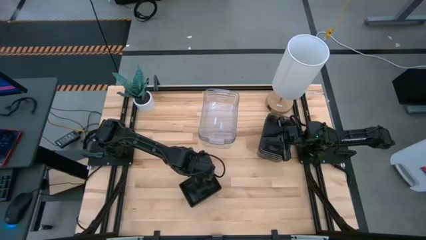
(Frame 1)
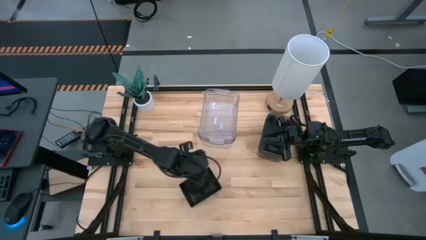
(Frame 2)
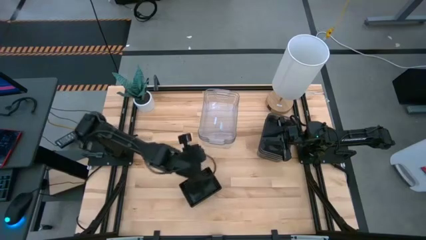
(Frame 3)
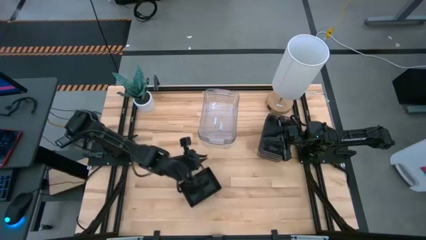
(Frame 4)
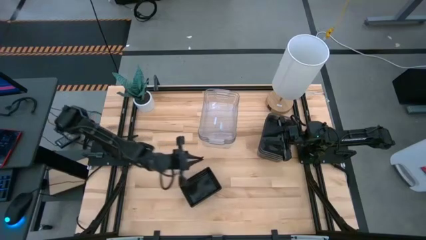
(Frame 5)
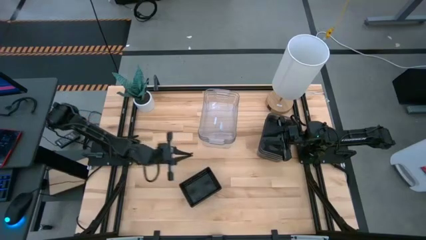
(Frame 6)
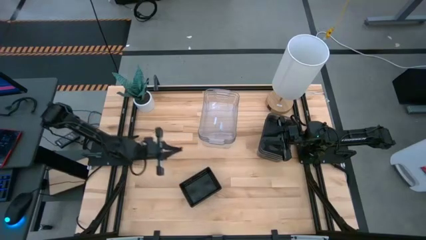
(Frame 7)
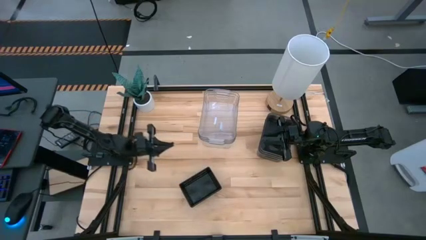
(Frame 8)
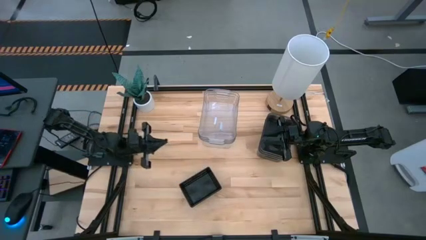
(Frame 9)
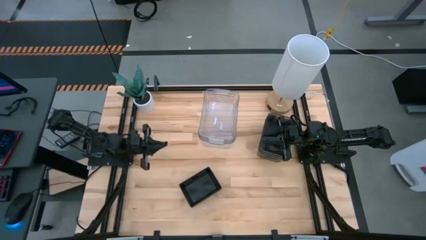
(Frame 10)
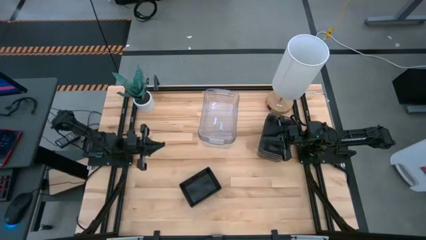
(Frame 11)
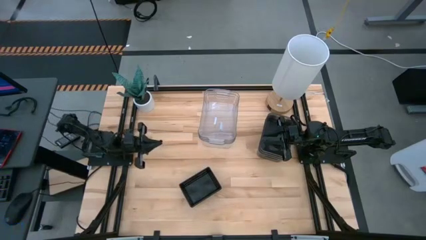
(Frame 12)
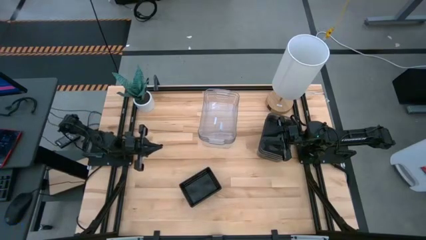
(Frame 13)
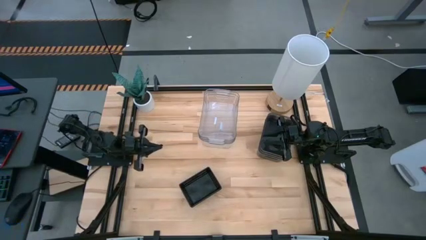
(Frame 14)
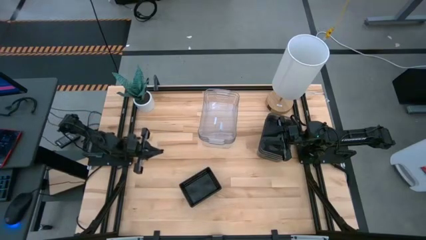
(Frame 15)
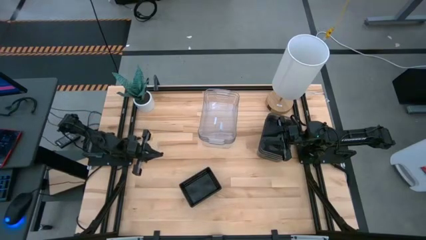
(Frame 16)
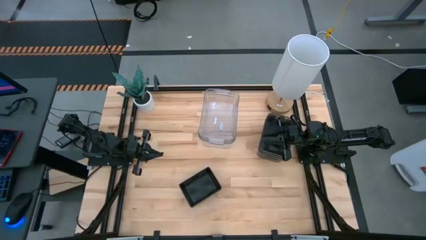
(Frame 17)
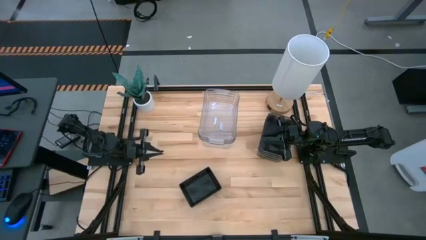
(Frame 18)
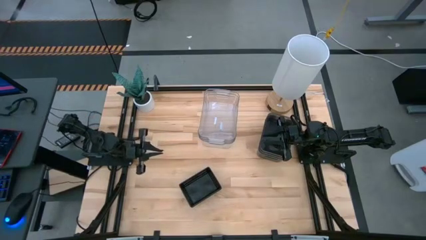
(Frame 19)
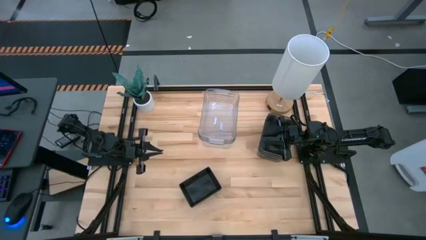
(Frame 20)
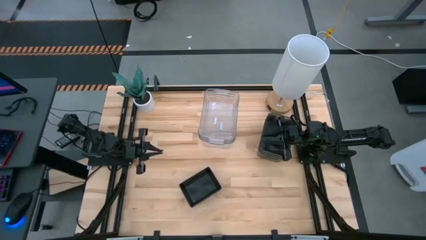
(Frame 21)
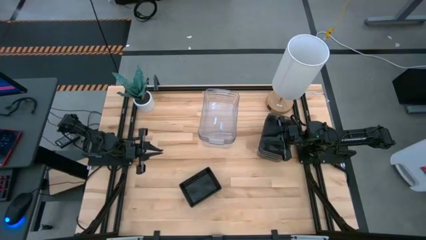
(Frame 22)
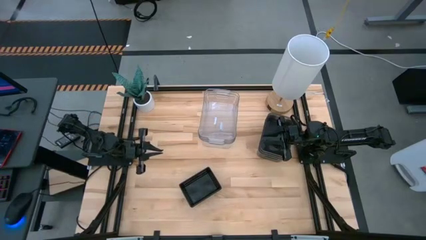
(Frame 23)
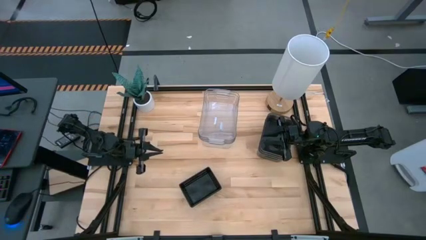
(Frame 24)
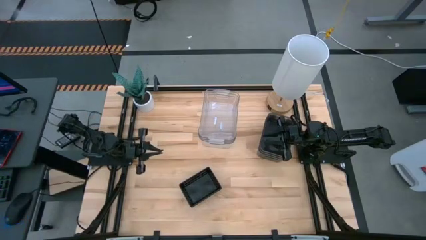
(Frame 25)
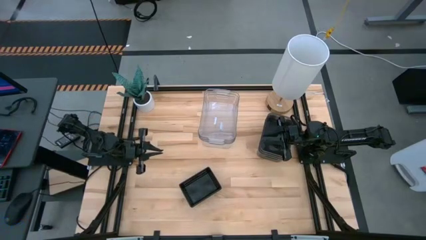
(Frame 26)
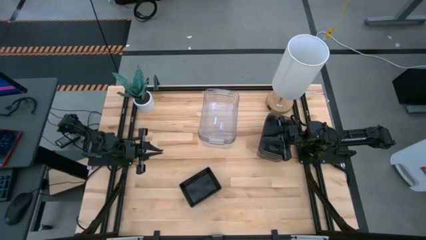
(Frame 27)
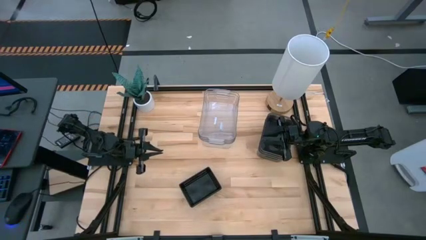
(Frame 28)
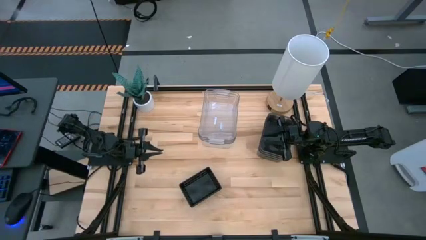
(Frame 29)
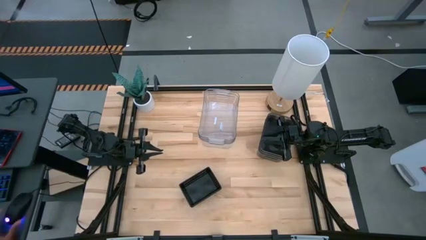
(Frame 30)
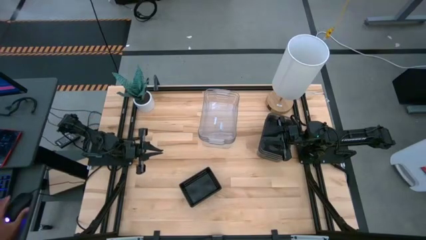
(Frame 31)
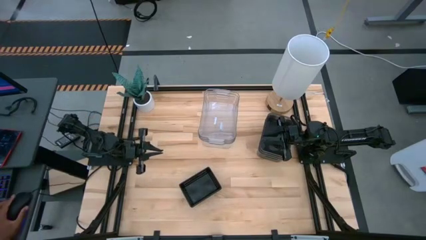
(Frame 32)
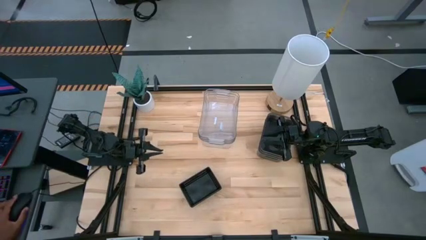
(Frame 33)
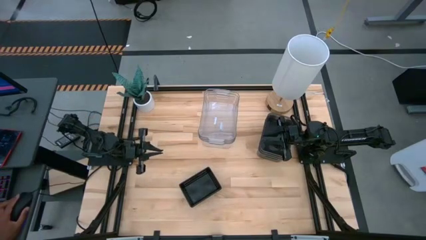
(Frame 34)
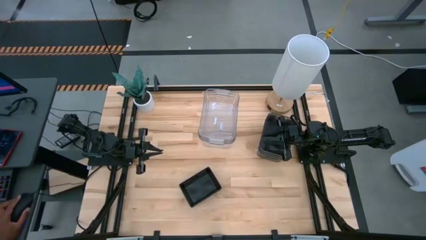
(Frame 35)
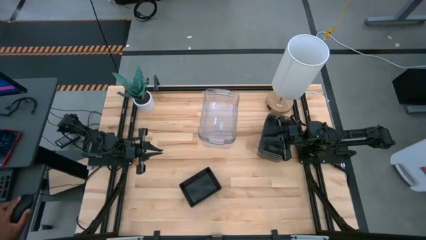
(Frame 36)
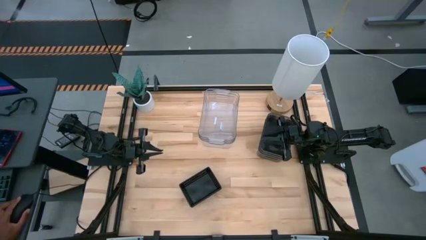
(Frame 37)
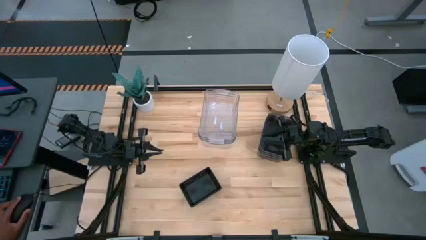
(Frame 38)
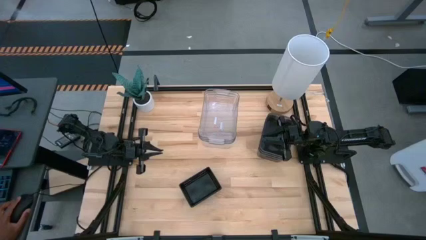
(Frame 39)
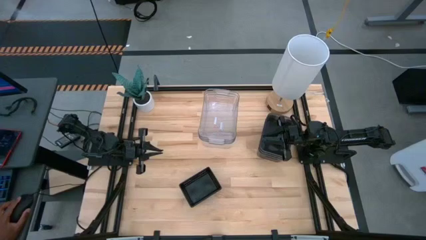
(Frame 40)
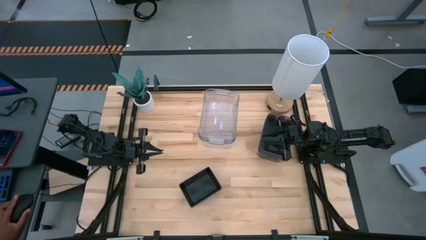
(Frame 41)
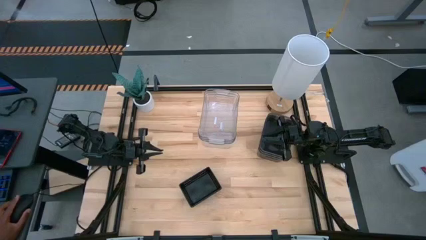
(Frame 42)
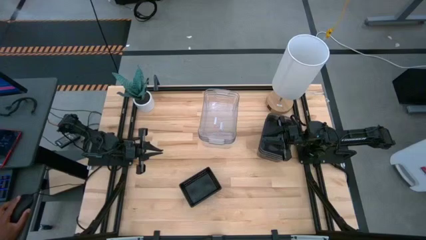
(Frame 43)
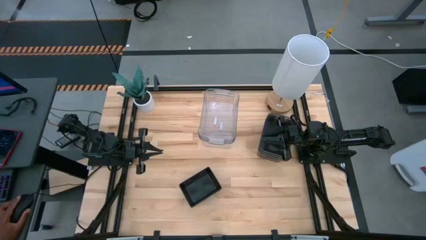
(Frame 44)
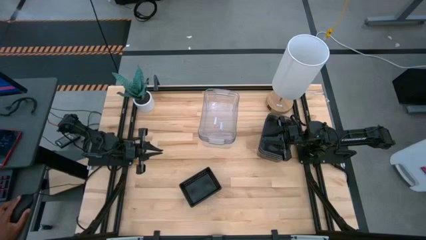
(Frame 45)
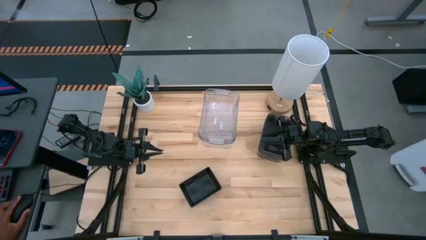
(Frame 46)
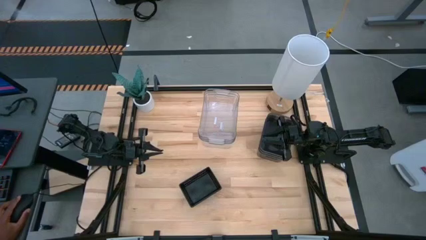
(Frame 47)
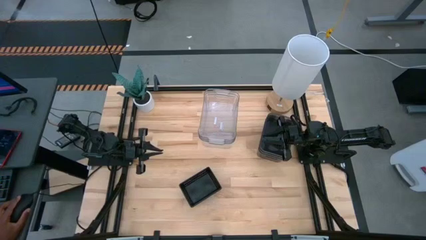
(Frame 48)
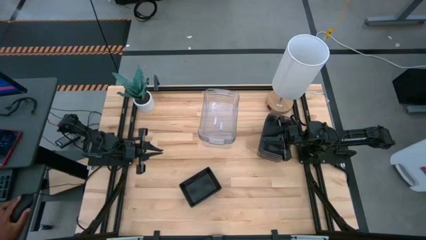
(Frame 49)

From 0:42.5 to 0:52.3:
Return to Home Position

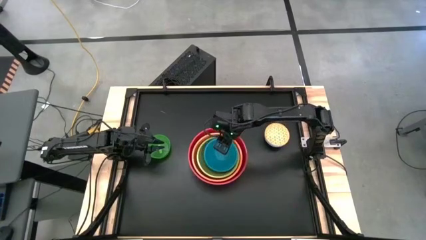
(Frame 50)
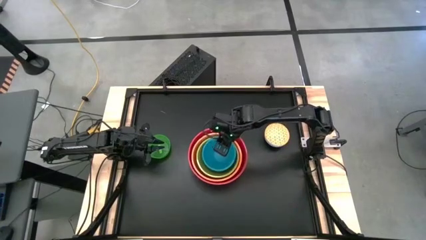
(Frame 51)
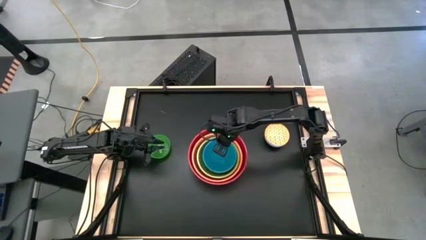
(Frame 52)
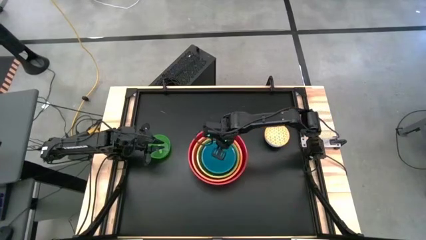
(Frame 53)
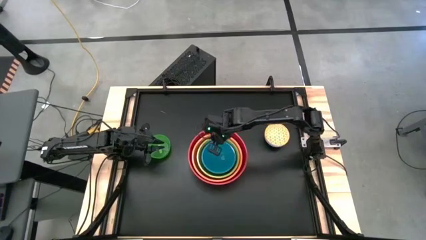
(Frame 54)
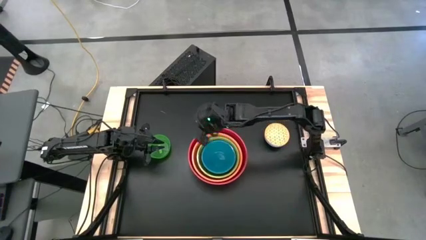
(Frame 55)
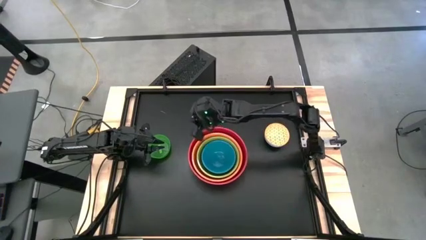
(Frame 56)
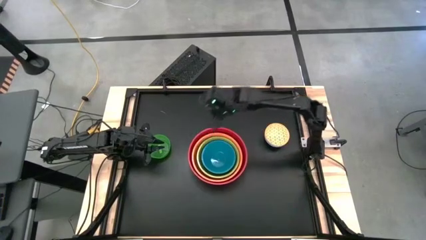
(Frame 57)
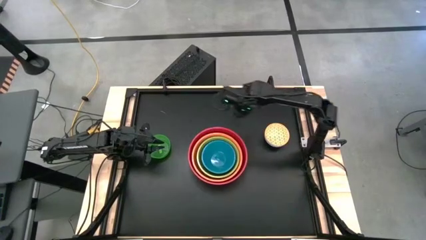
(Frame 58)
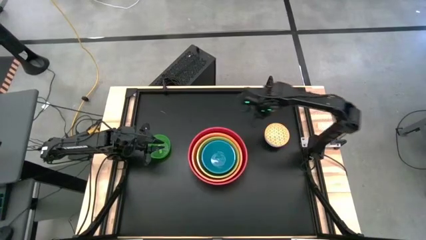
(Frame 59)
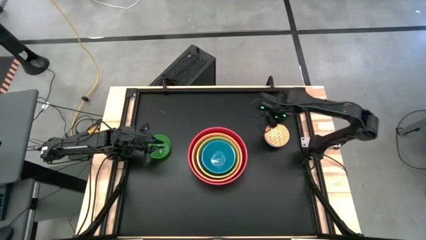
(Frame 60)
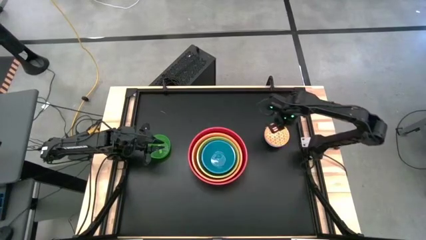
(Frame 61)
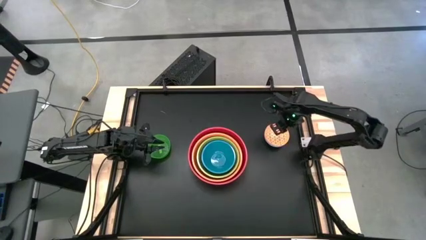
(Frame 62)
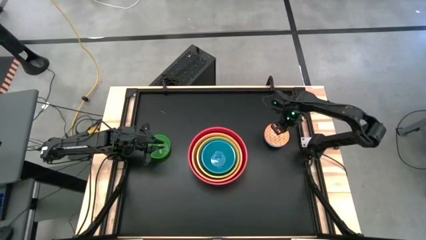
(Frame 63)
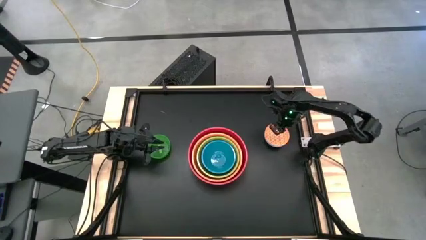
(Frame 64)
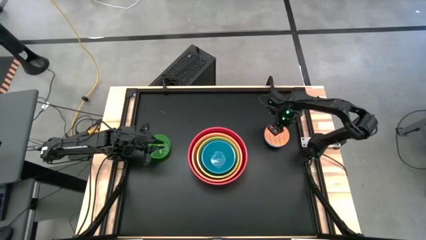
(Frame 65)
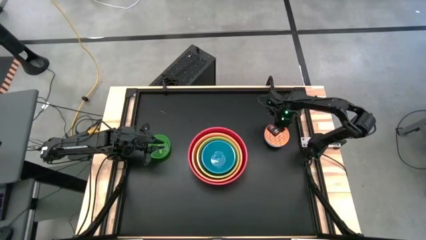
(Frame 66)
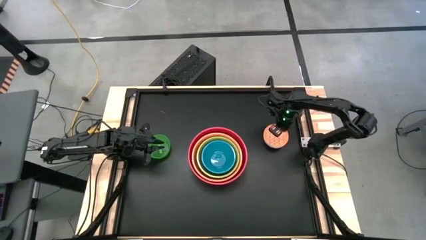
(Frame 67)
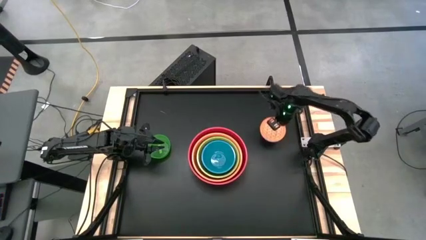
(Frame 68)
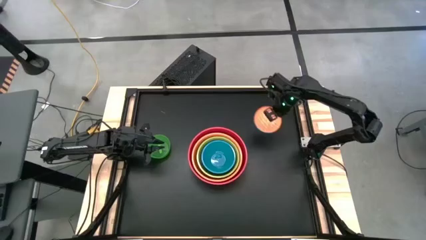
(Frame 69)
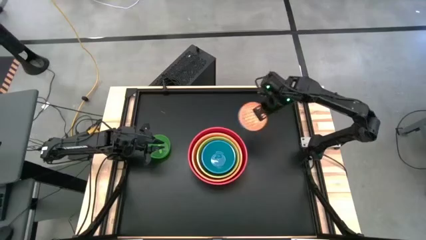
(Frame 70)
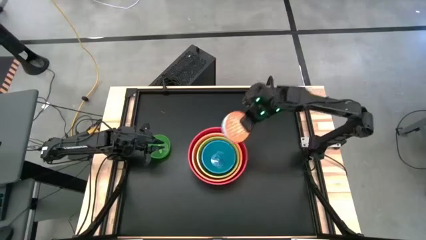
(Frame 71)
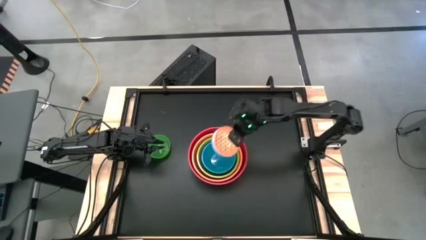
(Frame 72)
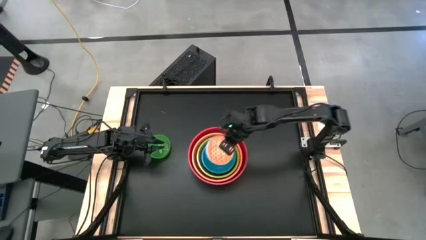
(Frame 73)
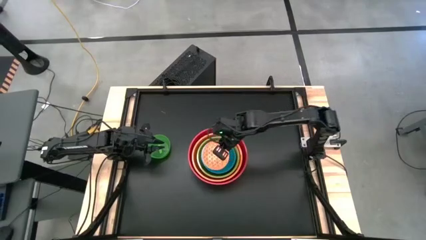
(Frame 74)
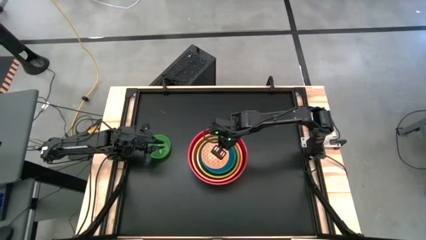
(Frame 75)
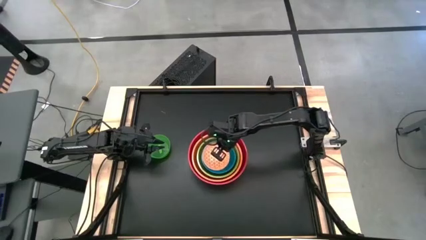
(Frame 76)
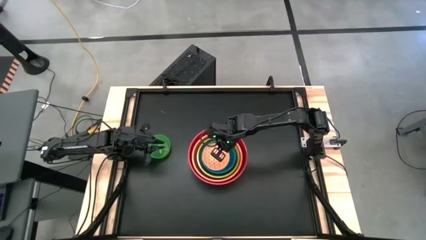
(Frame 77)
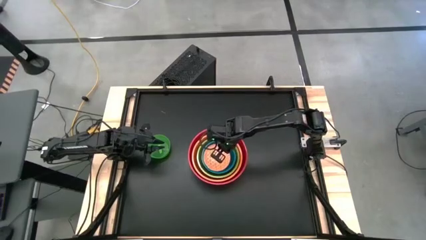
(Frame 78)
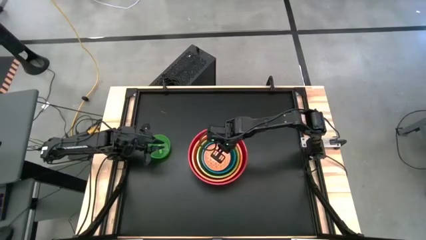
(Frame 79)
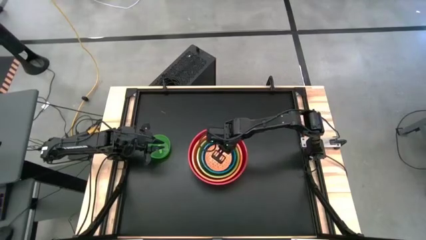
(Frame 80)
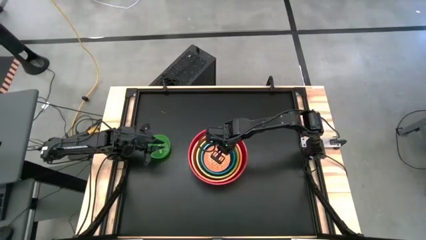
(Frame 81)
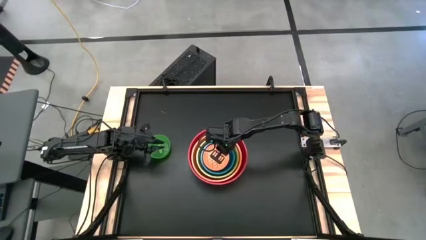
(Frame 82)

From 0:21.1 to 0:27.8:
Stack the orange patterned bowl on top of the blue bowl
